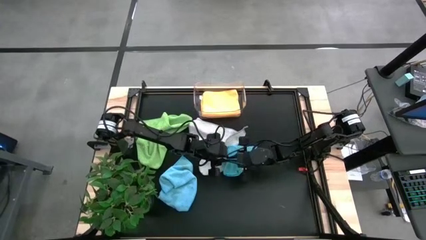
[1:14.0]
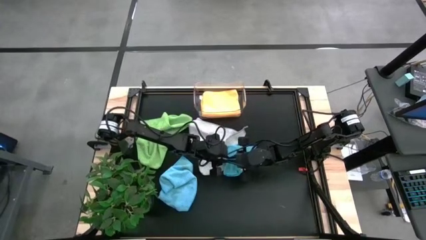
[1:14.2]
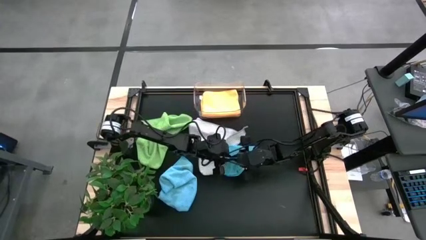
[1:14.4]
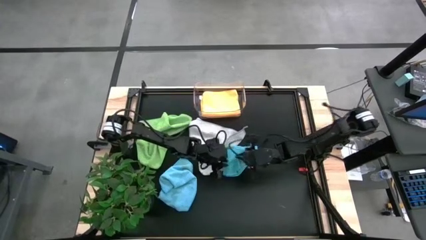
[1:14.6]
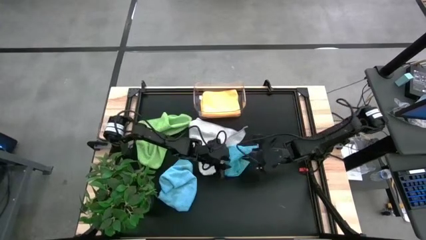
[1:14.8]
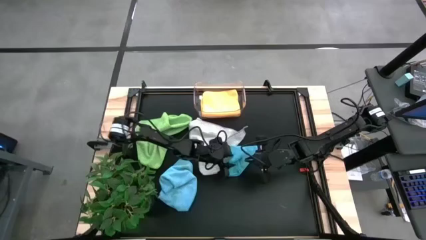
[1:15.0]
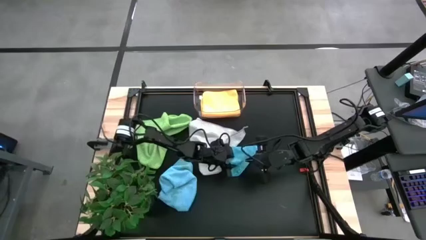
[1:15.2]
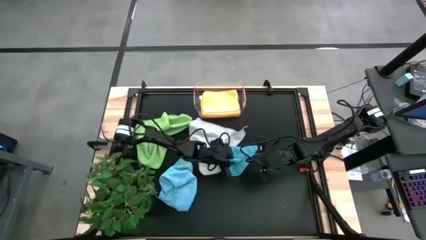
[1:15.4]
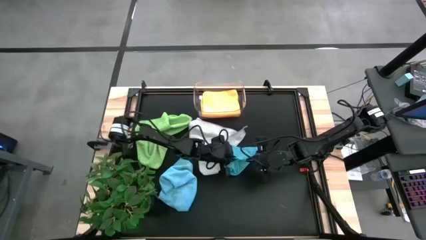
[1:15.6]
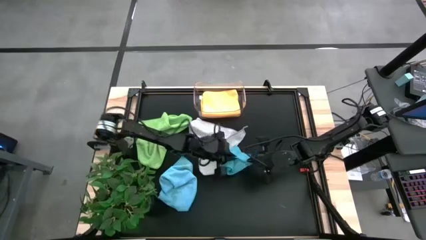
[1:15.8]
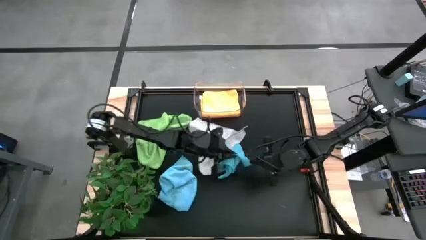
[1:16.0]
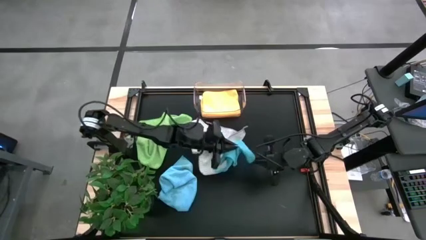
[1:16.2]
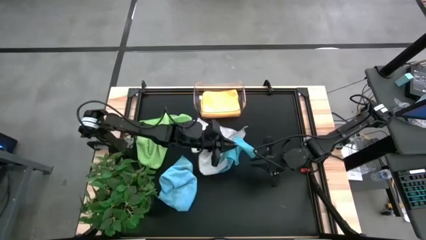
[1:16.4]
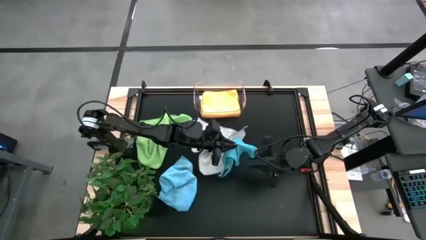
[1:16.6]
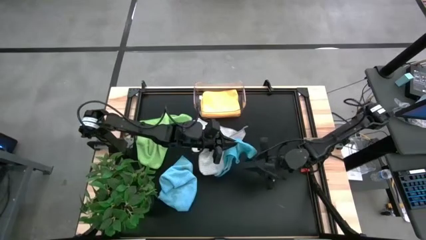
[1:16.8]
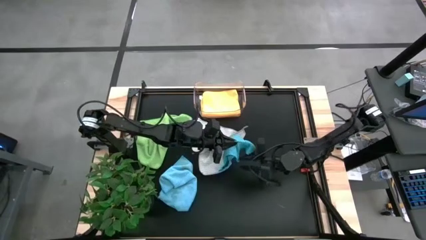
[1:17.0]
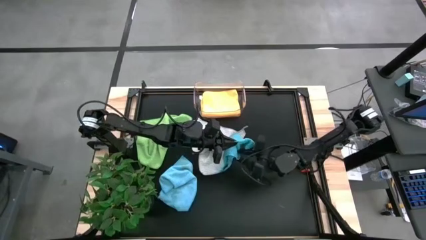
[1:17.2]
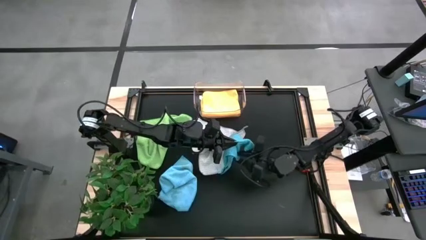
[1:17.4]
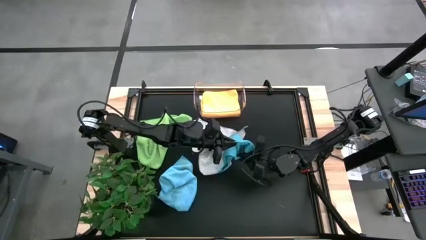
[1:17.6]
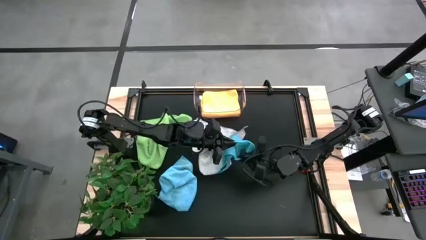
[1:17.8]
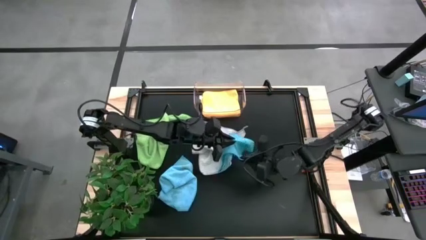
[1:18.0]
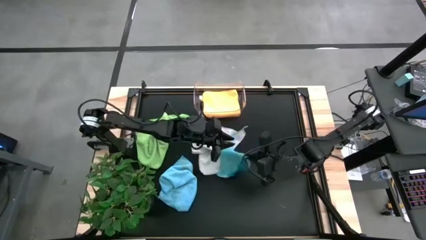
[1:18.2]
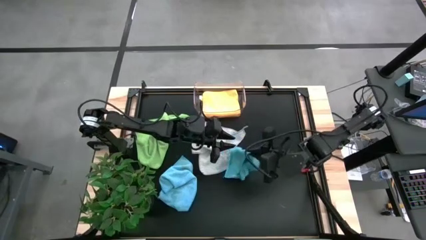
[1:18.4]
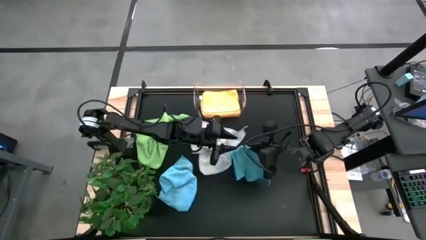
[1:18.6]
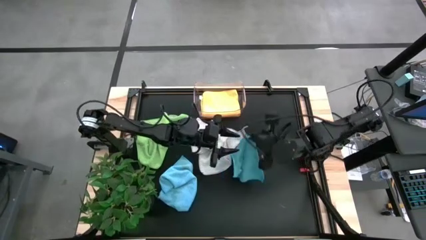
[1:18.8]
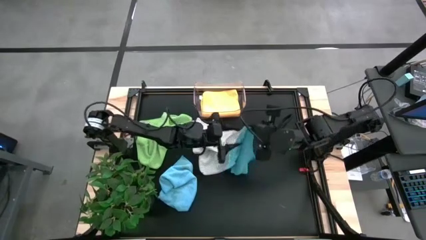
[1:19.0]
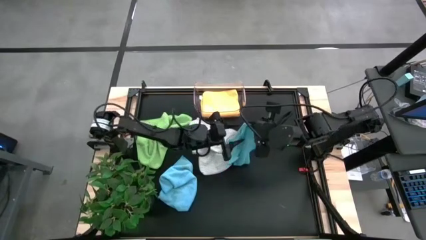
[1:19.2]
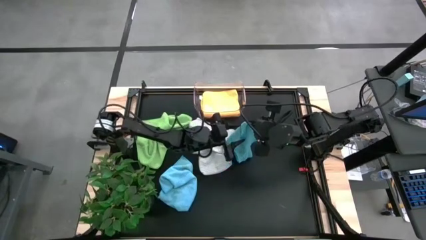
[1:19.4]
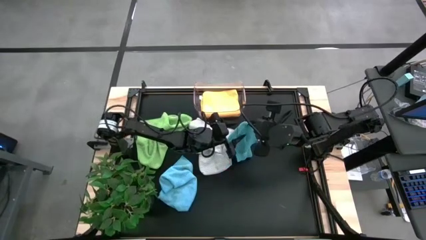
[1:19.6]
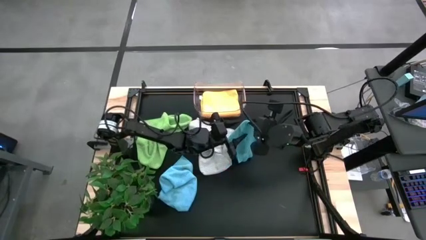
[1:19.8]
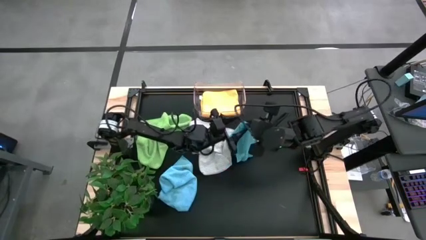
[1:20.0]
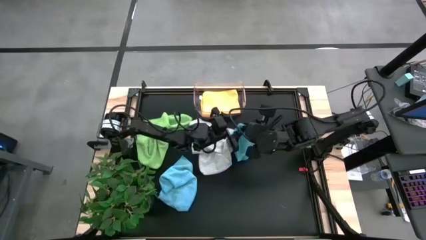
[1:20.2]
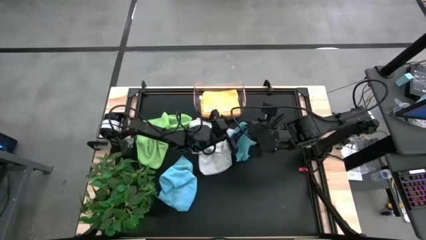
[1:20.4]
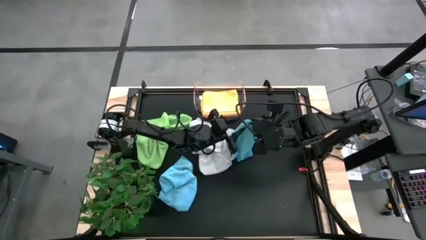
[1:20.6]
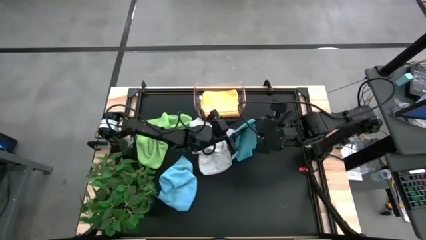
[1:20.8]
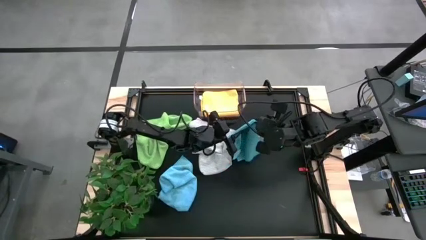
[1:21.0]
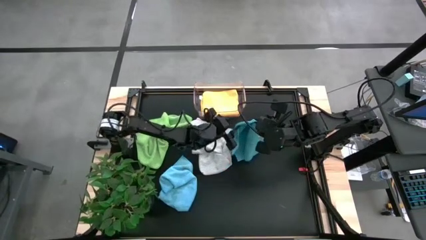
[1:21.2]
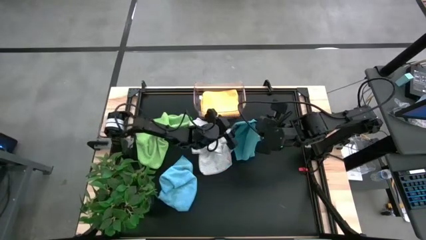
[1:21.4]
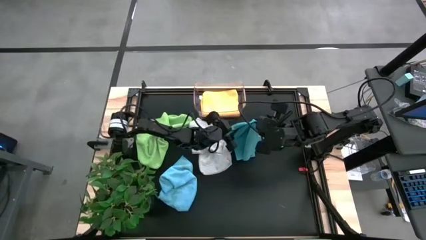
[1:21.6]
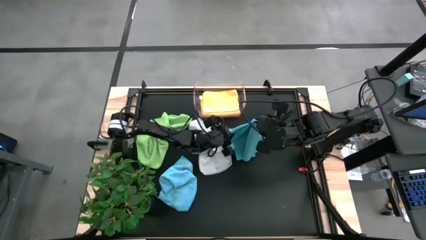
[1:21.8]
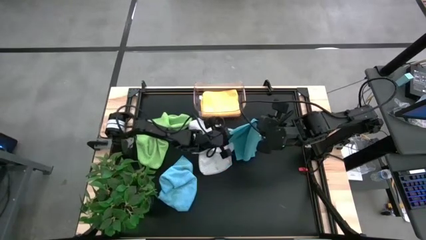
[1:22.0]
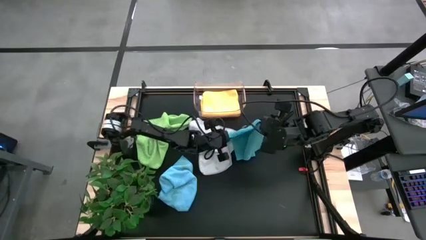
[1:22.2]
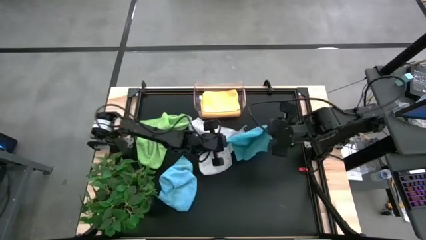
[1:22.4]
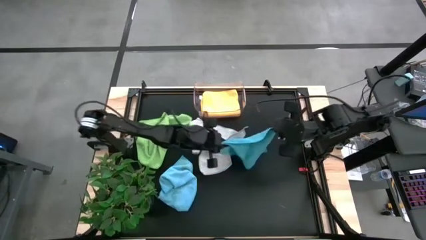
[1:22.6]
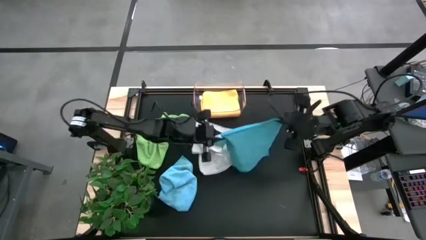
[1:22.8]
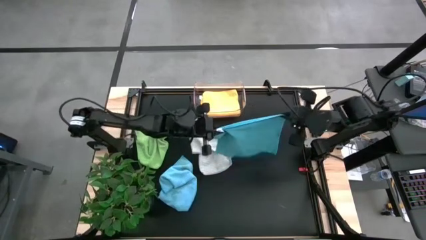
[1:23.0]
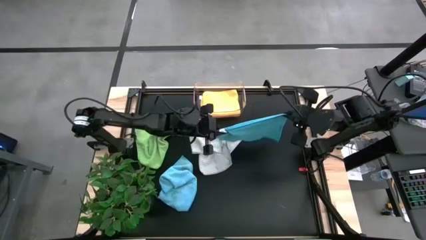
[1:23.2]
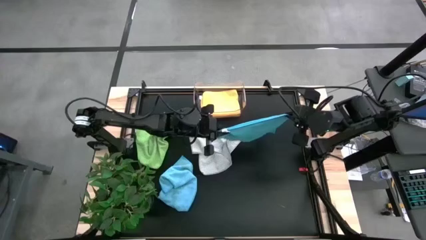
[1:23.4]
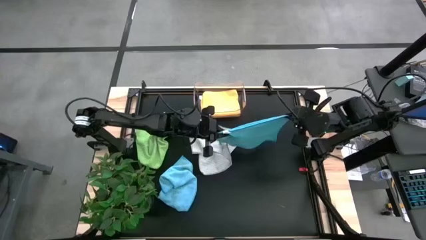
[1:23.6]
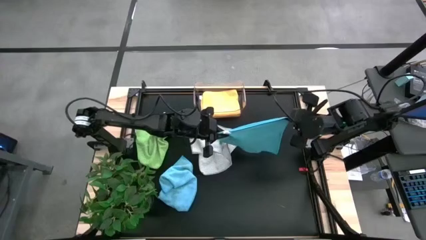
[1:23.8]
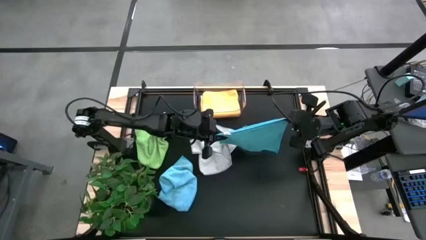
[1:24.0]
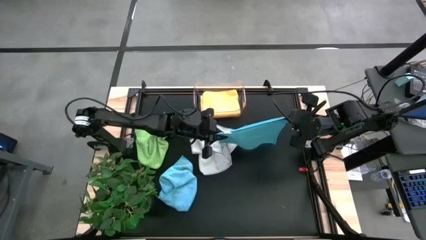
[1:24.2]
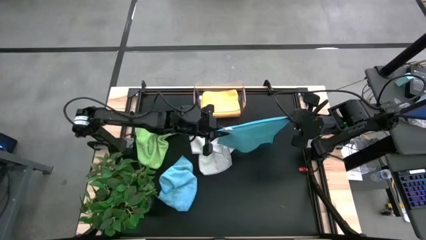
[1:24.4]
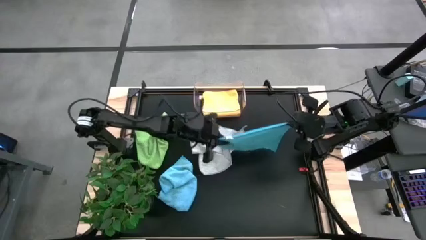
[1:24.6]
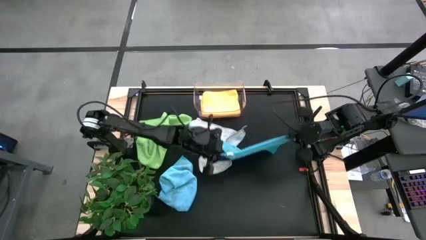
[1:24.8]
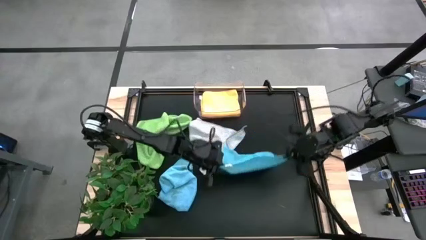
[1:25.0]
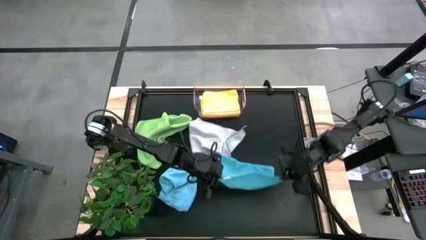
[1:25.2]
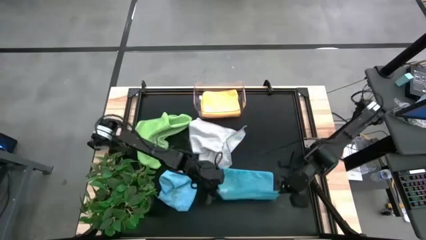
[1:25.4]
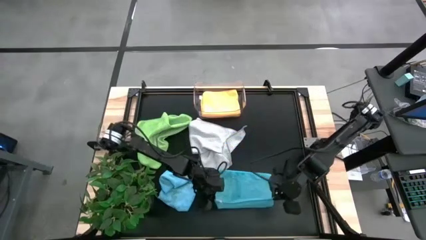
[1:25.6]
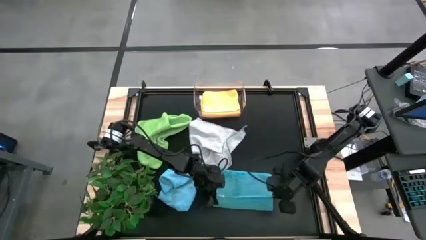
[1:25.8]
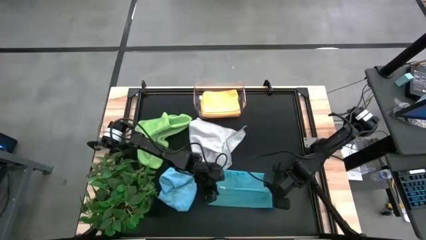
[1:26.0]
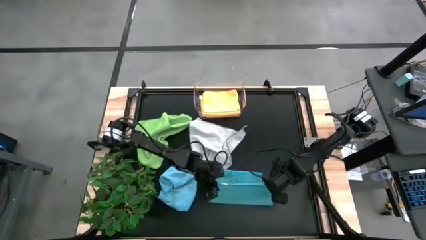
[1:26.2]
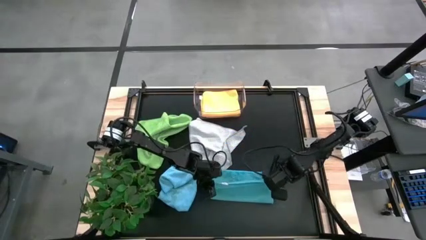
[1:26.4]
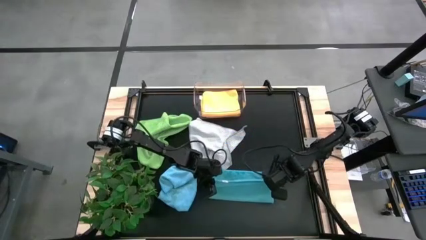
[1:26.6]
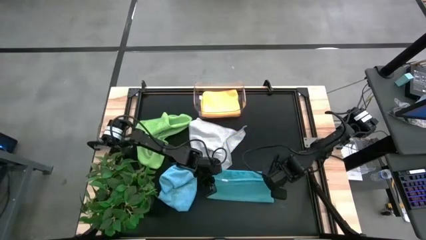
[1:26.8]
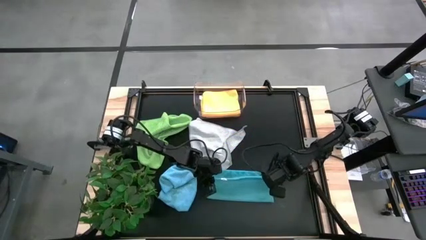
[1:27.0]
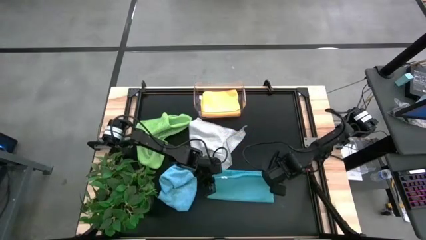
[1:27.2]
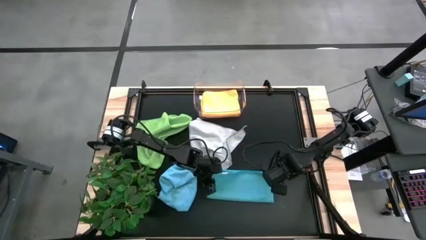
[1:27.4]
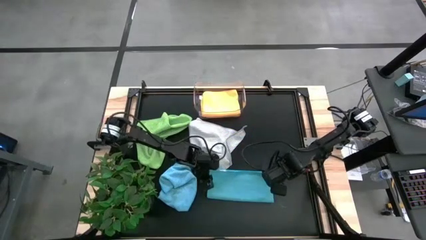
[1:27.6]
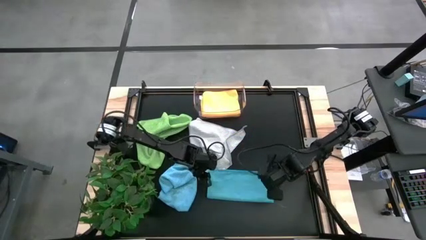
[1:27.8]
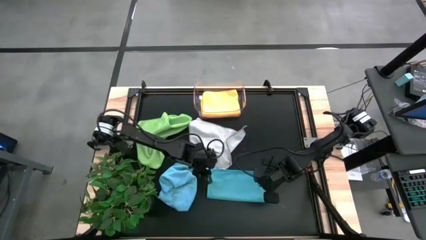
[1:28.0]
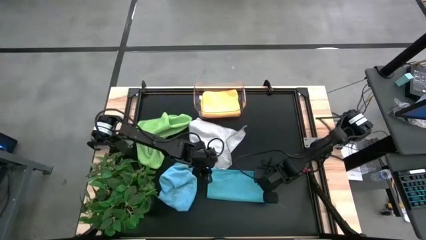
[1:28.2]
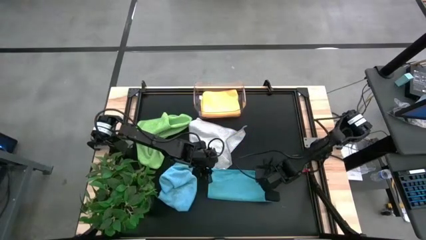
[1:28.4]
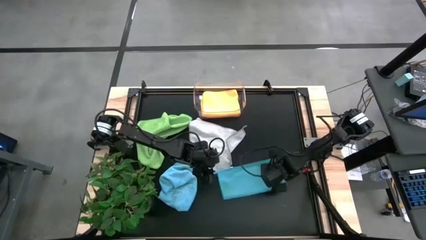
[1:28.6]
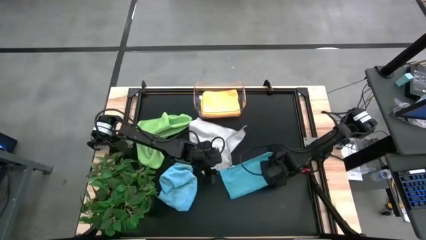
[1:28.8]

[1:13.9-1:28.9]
Task: Fold microfiber towels
Fold the right blue microfiber cloth

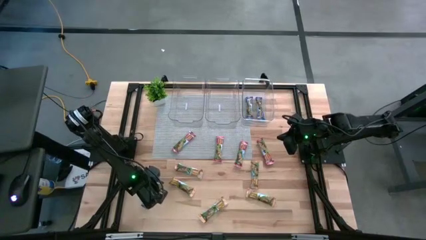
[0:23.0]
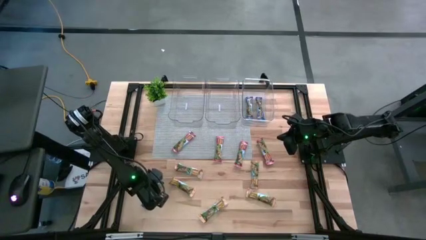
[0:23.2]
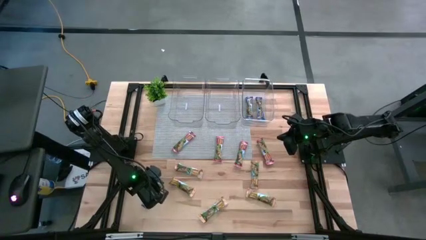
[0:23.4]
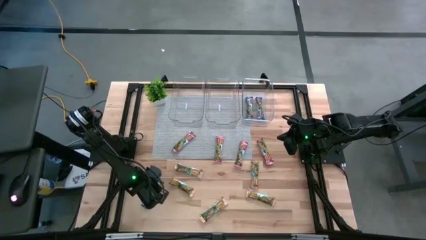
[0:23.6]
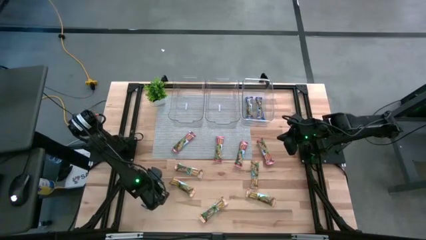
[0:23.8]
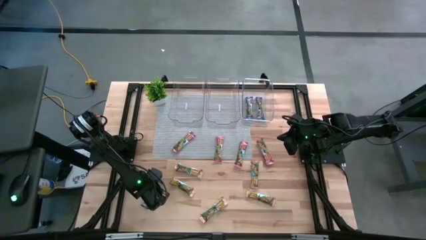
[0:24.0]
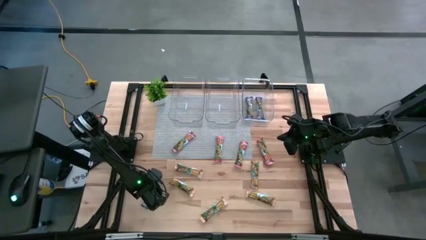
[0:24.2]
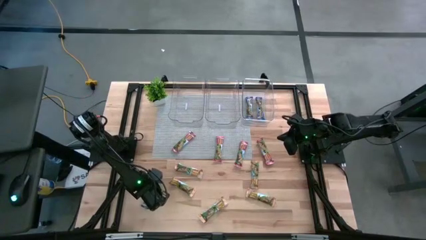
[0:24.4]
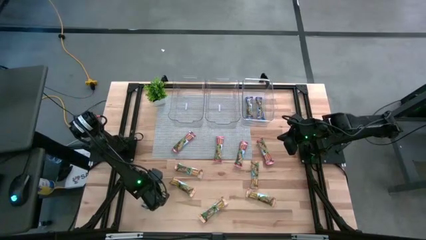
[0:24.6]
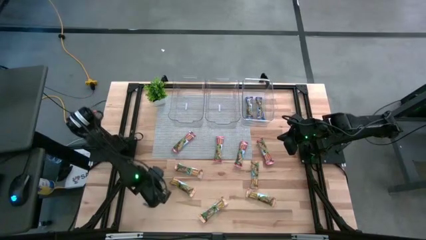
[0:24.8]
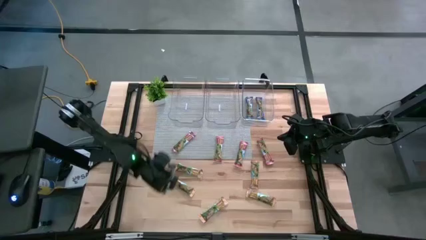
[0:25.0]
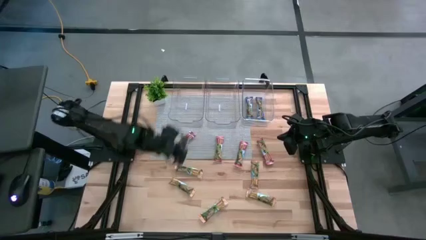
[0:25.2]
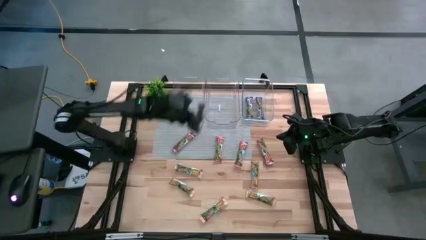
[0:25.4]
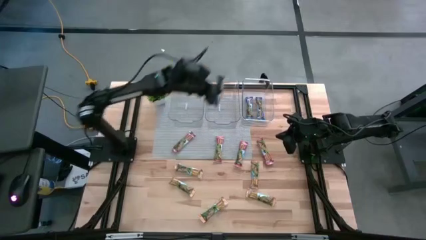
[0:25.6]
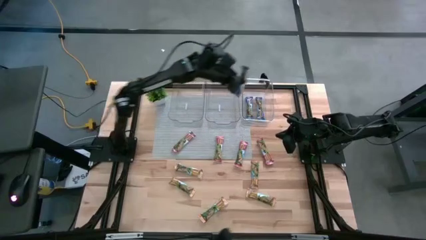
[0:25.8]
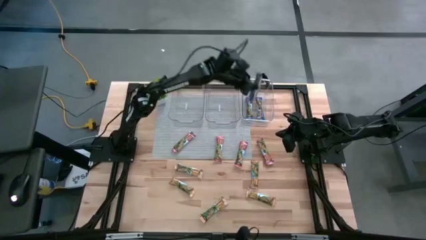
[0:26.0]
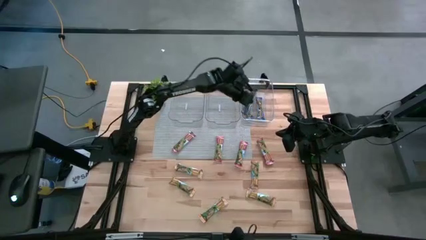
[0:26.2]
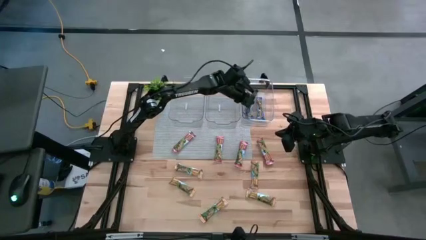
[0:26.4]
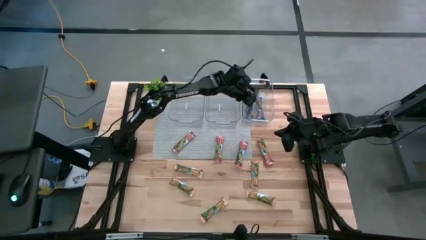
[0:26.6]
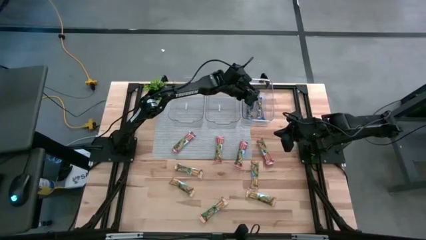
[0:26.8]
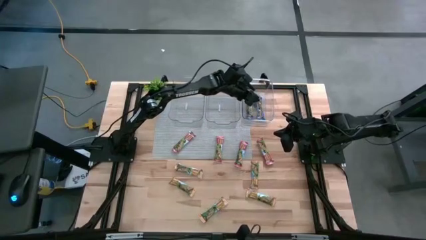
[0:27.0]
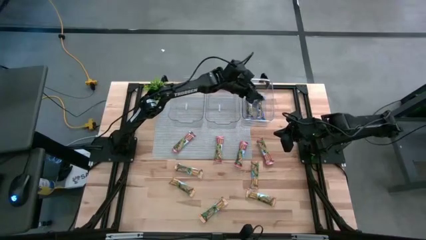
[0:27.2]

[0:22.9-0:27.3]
Task: Pick and place Granola Bars by type
Put the blue granola bar into the right transparent bin
